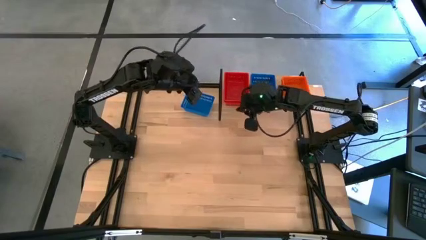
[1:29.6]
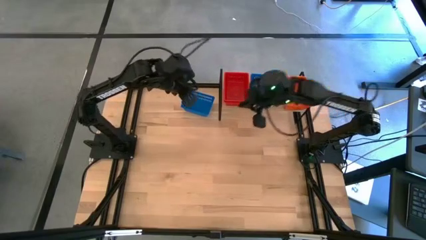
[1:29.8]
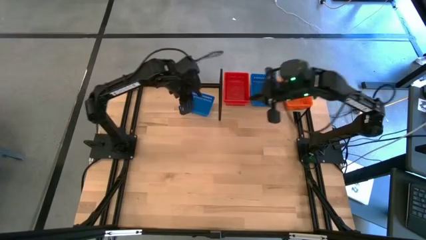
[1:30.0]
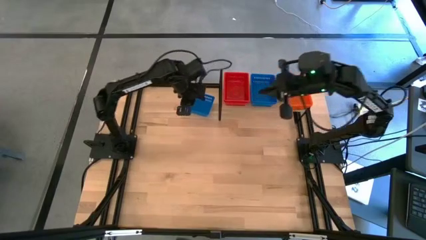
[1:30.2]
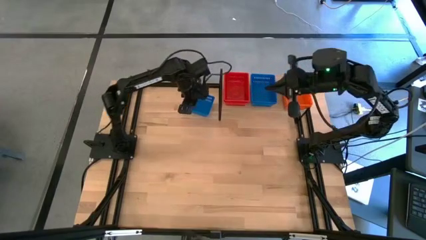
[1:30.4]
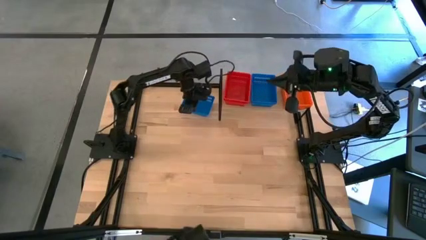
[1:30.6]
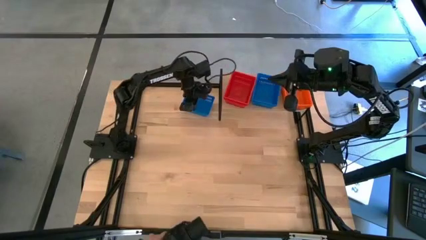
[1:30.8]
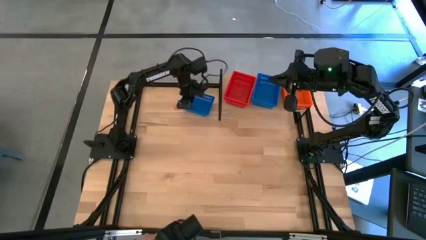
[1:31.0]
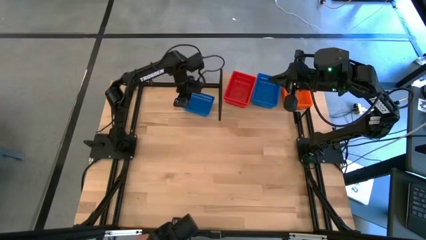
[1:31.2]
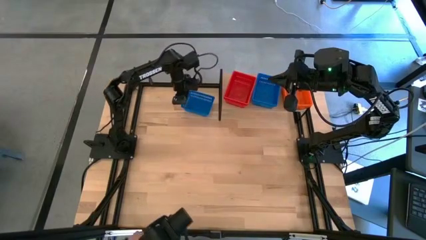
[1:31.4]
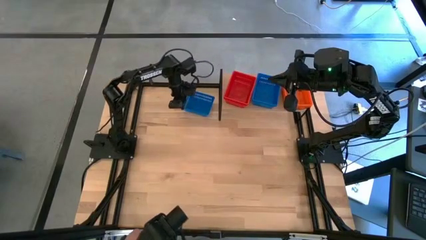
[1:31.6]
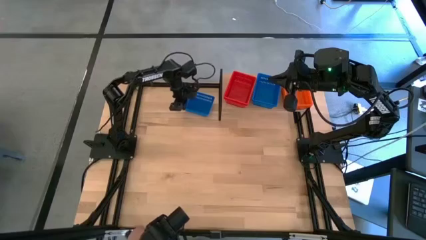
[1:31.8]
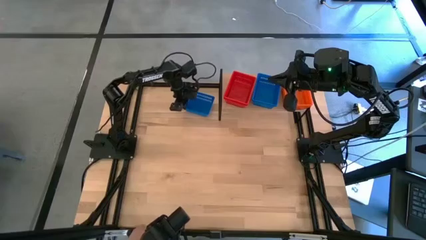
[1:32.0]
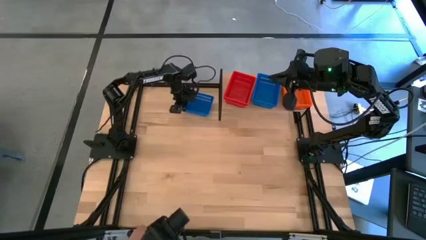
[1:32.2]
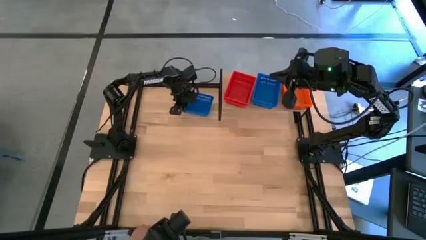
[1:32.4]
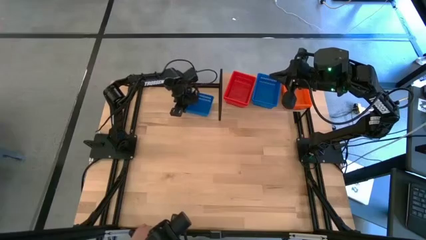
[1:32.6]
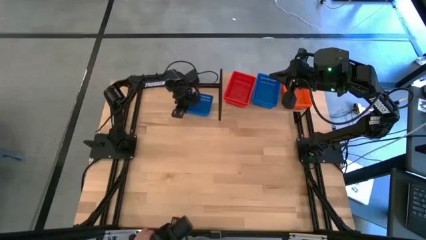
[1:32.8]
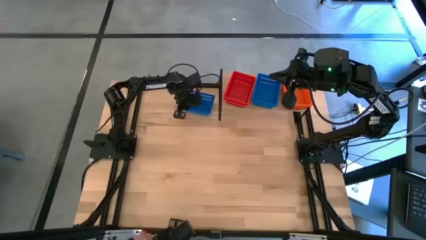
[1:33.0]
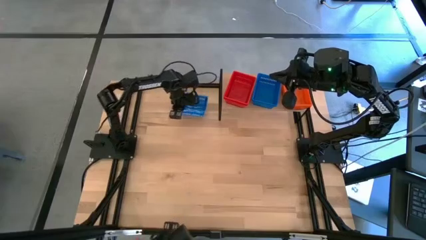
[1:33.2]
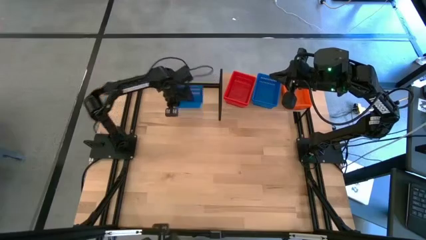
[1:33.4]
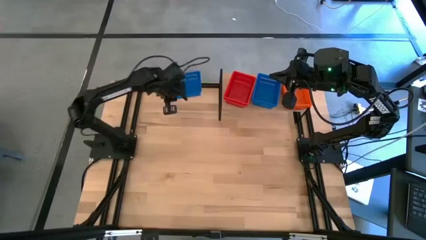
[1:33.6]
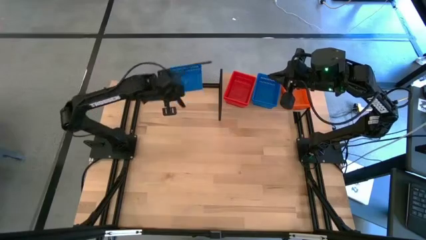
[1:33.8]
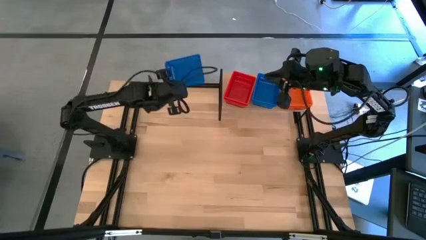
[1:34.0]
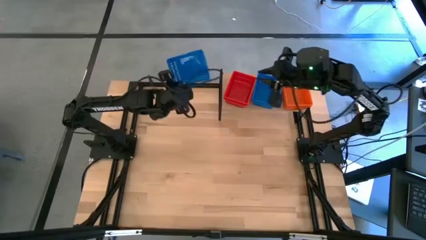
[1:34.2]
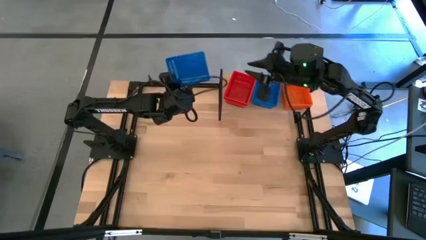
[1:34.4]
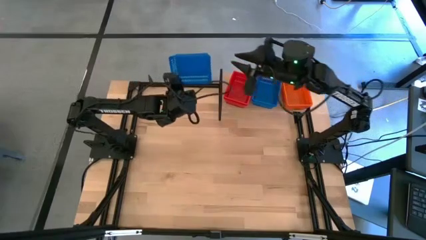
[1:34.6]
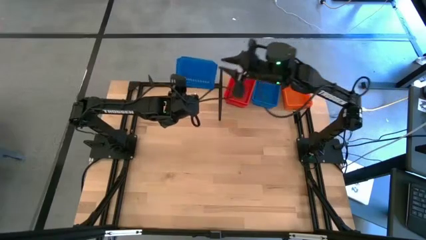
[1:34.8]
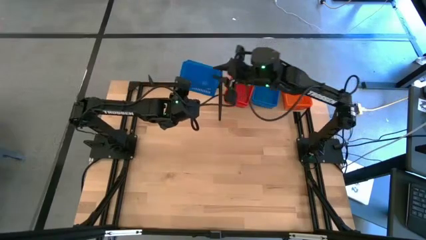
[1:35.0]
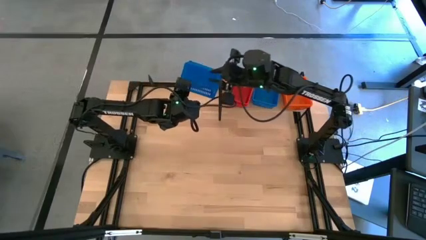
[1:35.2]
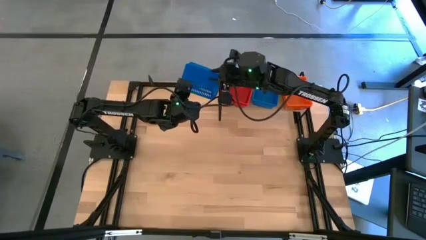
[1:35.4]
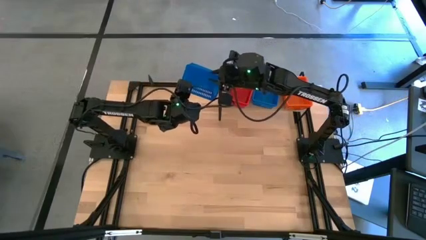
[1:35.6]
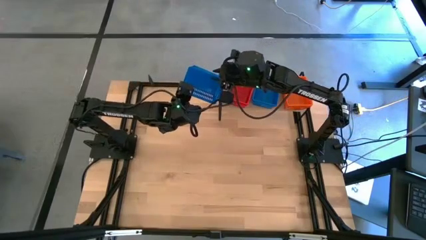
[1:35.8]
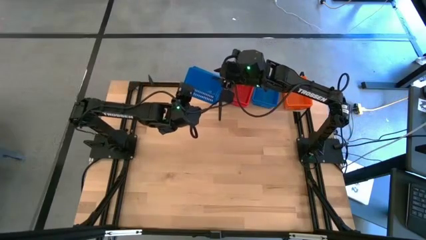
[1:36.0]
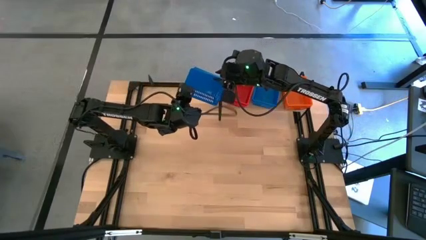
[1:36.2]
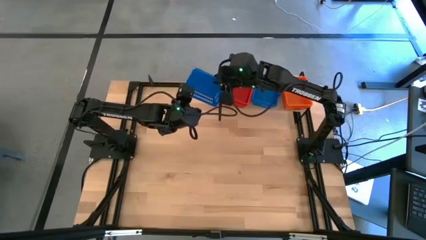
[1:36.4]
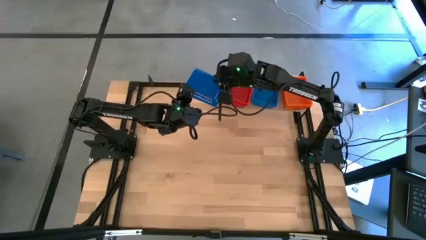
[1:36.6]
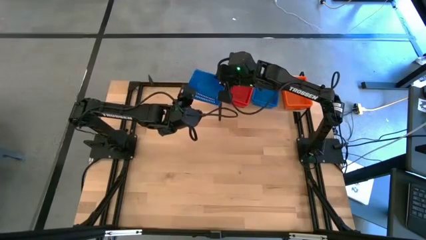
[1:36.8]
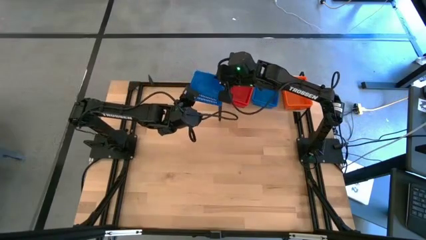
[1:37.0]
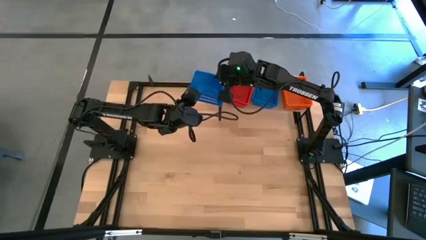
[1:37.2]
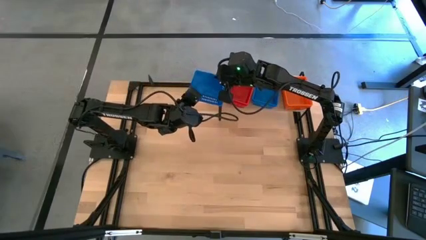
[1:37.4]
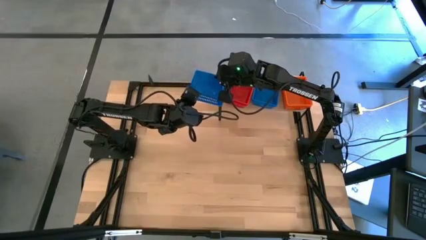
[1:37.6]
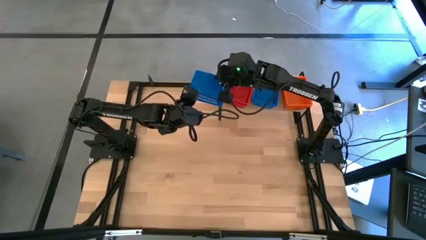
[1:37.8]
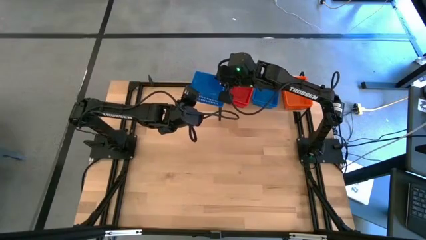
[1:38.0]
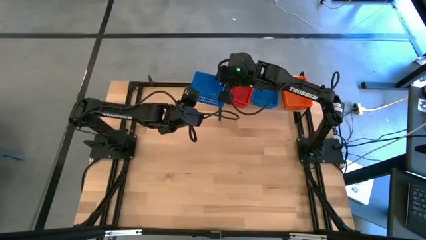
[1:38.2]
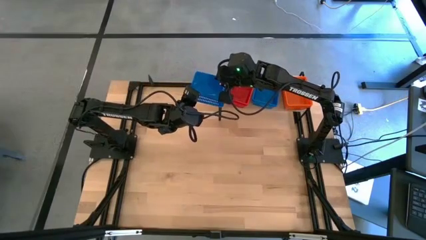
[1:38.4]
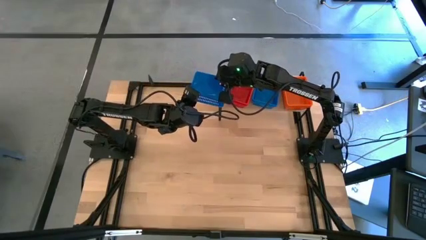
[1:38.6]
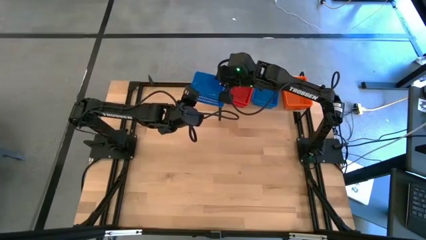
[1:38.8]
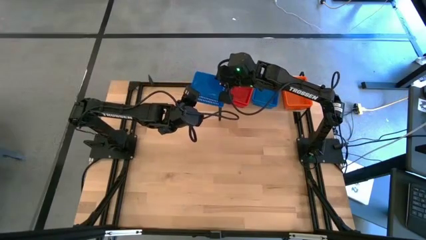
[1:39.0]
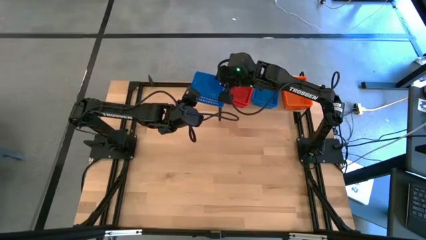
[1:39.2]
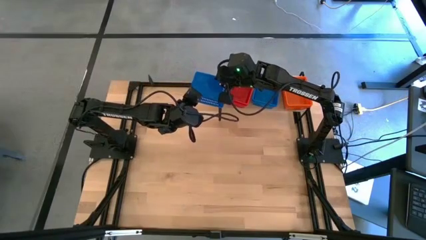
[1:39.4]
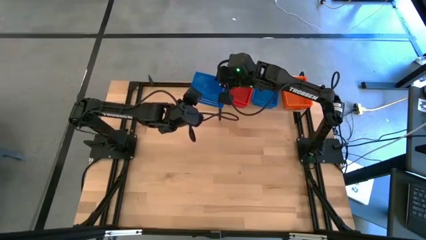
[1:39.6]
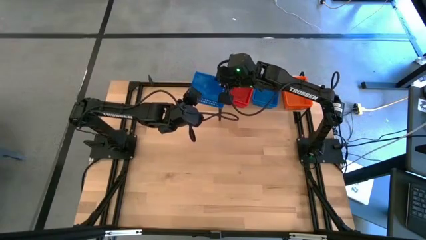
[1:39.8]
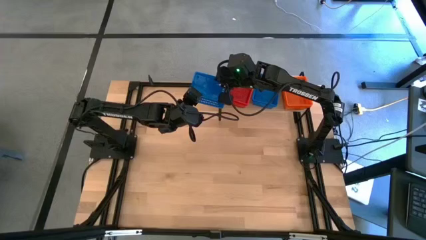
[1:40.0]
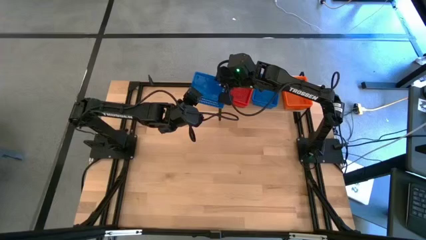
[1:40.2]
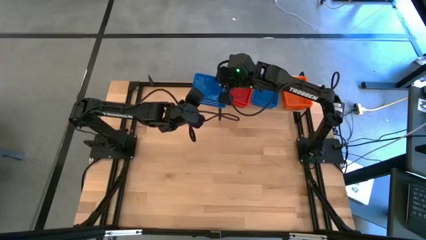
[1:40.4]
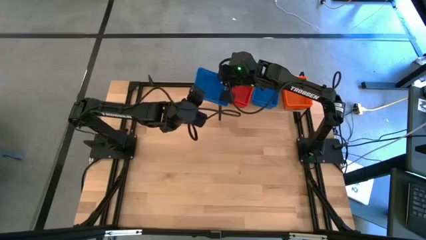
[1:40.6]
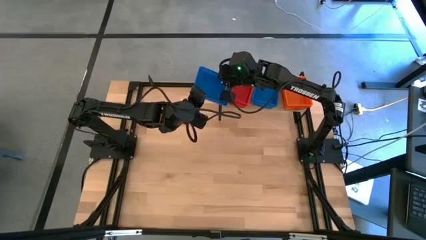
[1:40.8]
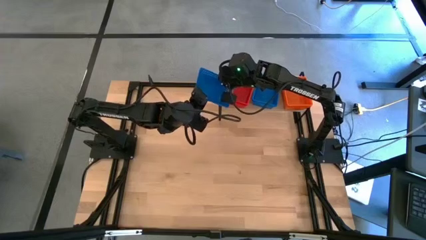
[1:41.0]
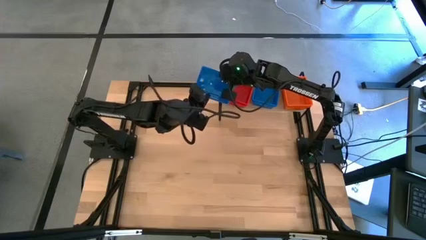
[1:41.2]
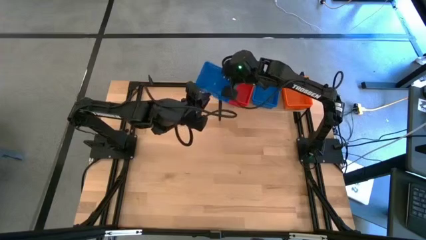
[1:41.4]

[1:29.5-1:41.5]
Task: Stack baskets on shelf by color
Stack the blue bin on top of the stacked blue bins on the shelf

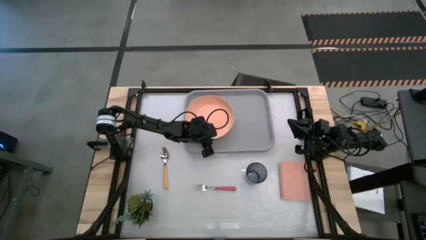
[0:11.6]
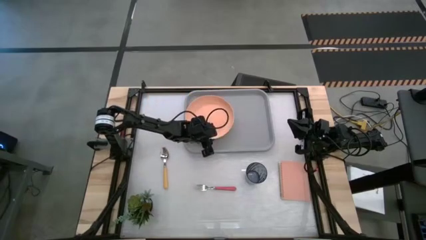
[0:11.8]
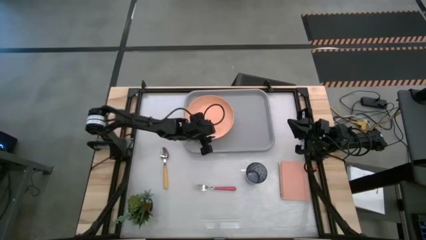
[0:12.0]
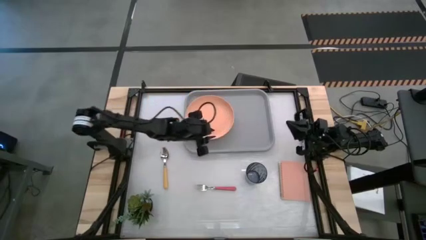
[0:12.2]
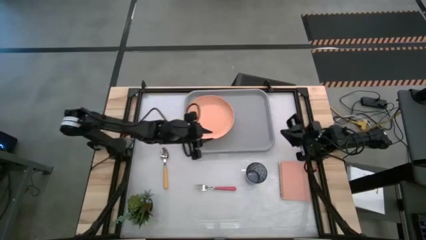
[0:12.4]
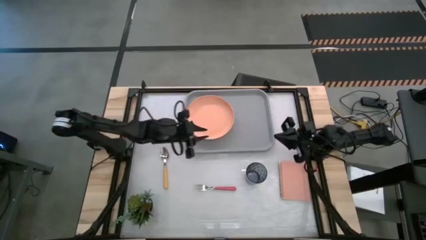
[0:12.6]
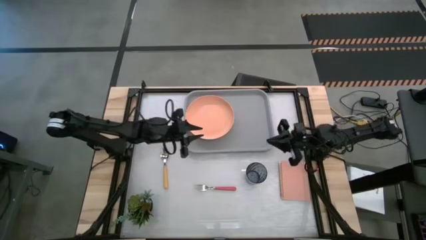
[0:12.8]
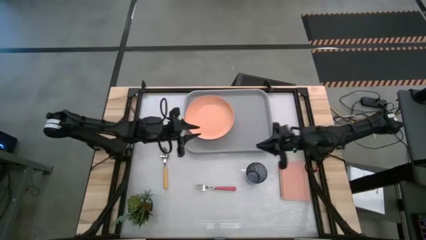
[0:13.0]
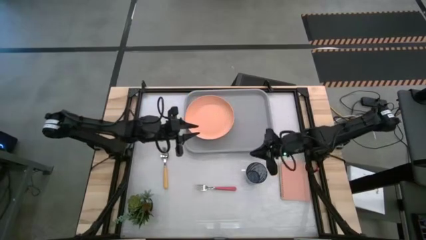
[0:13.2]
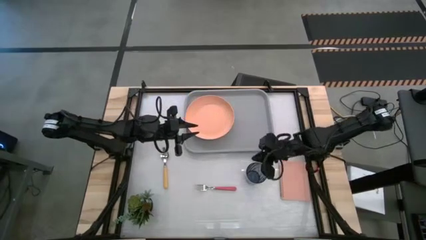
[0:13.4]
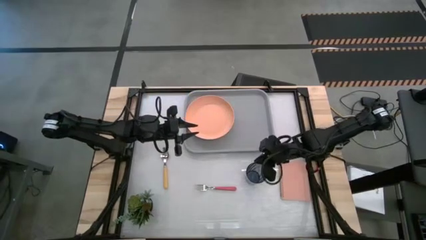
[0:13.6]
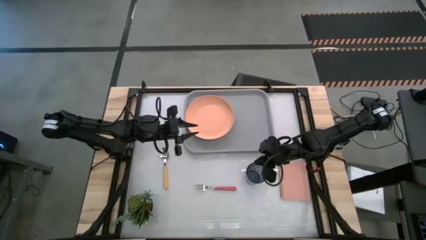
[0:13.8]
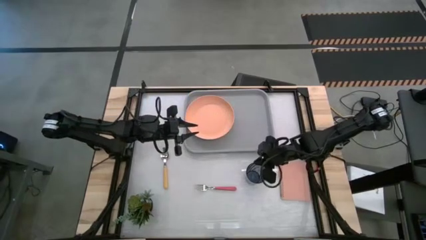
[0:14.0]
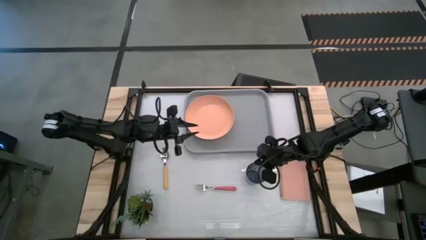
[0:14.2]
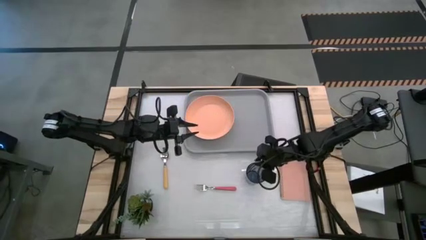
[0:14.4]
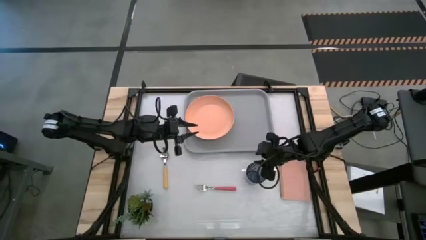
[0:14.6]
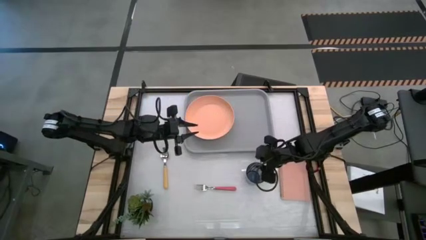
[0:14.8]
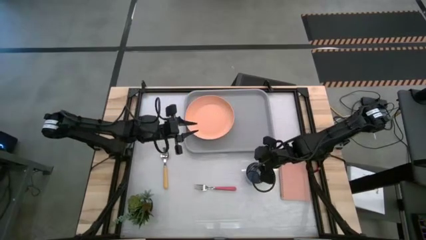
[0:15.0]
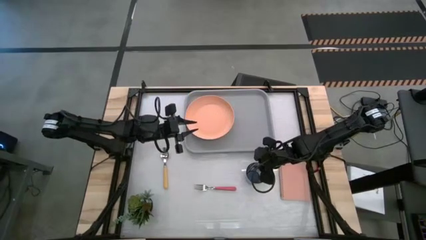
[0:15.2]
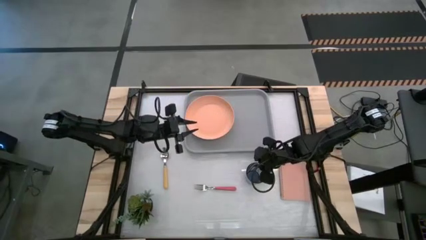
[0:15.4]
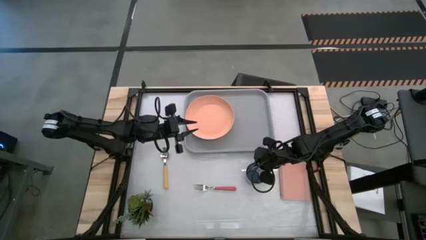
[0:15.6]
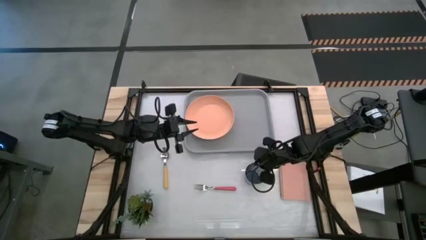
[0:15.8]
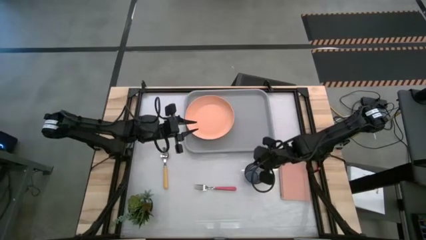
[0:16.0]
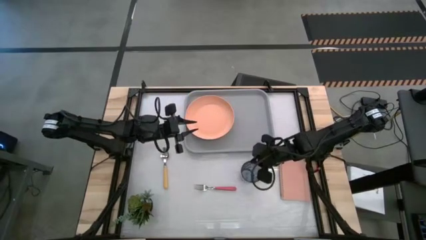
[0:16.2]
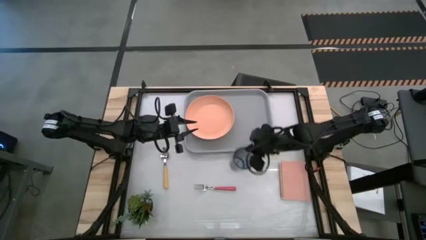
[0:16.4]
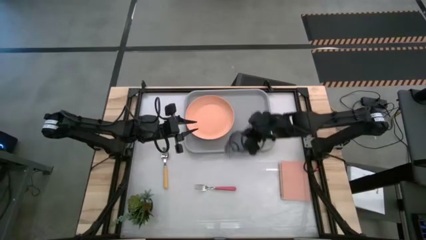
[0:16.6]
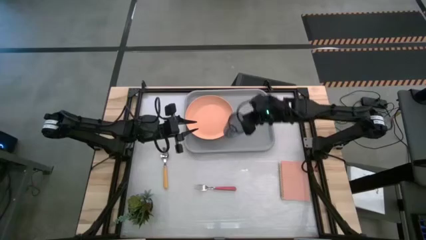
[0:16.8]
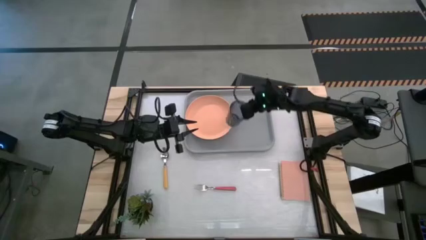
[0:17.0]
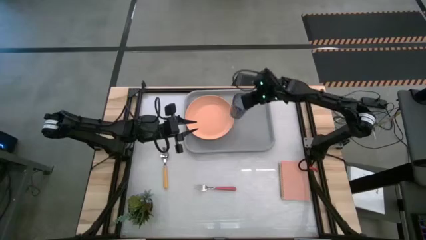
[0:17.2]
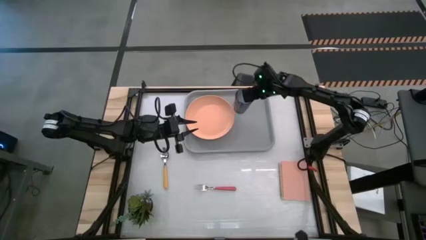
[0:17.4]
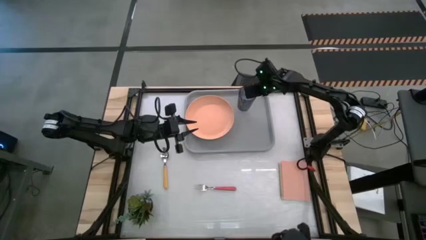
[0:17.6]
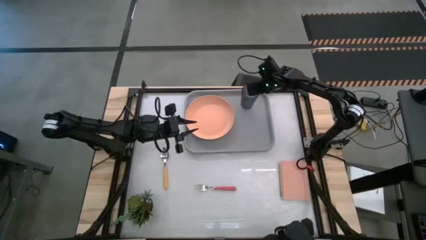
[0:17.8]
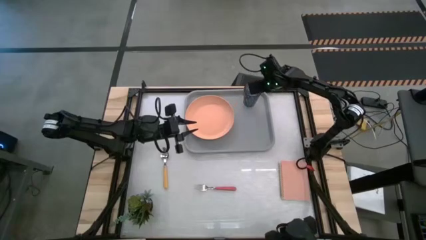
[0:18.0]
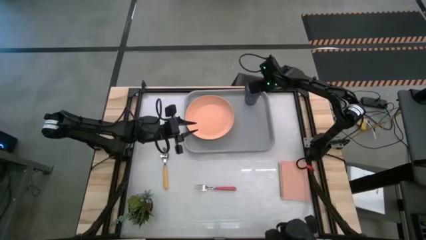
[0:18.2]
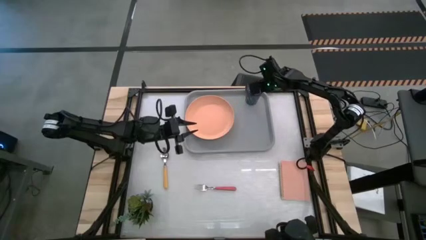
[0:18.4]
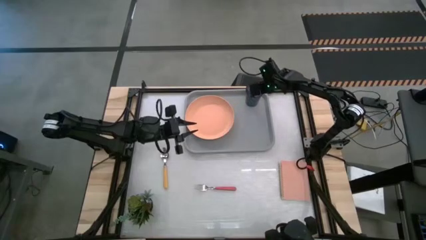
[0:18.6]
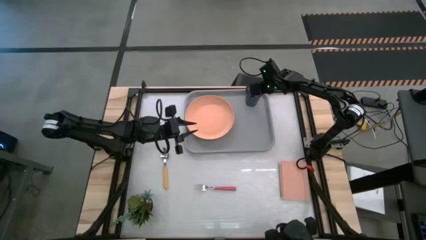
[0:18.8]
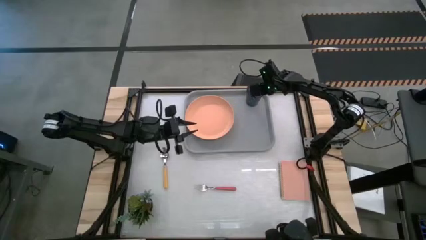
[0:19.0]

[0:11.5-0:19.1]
Task: Pick and place plate/cup/fork/spoon on tray
Put the blue cup on the gray serving tray to the top right of the orange plate
